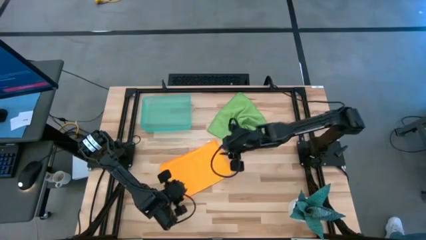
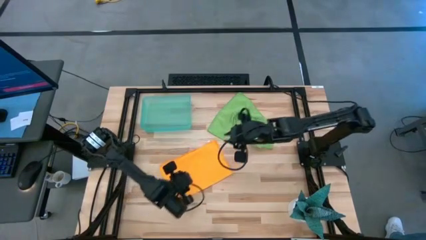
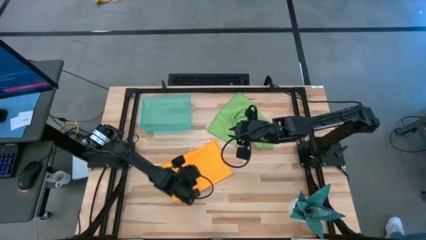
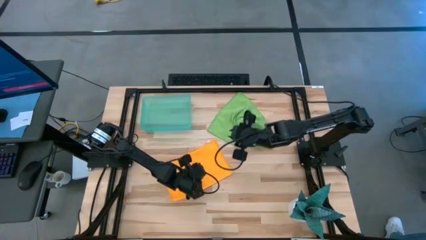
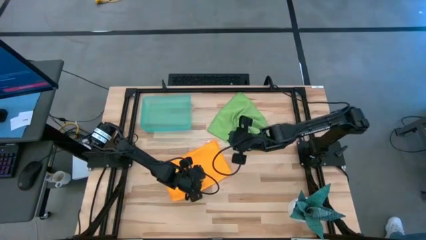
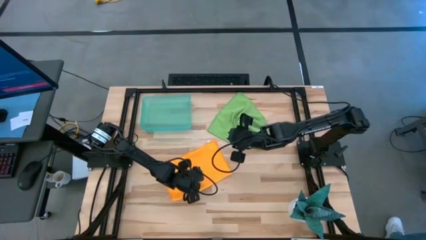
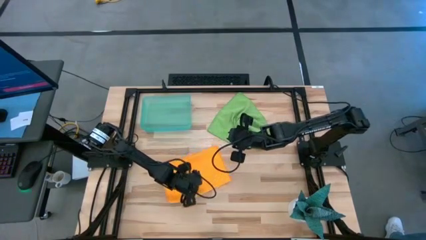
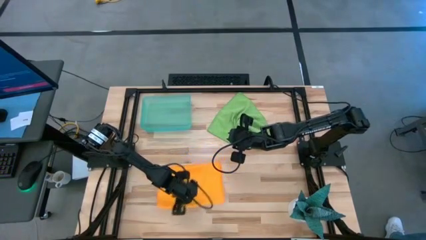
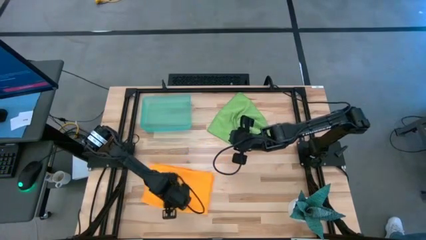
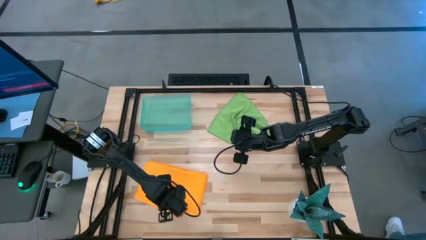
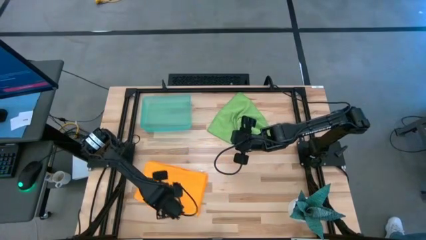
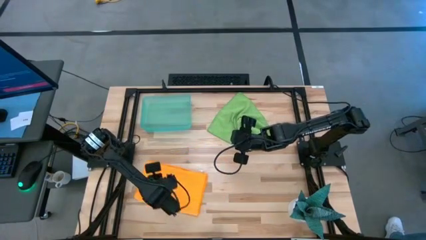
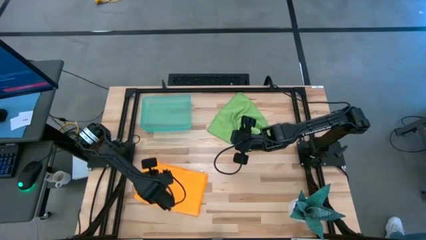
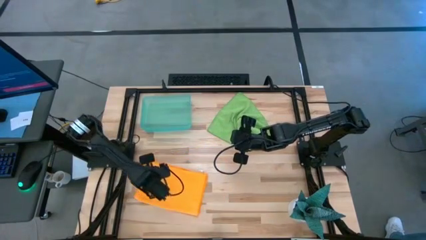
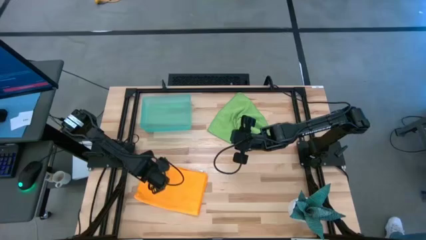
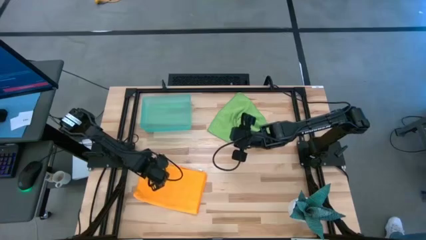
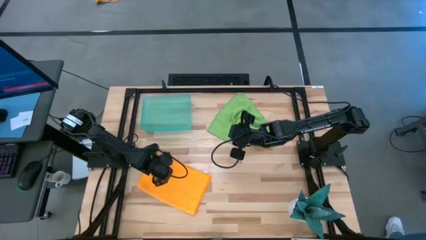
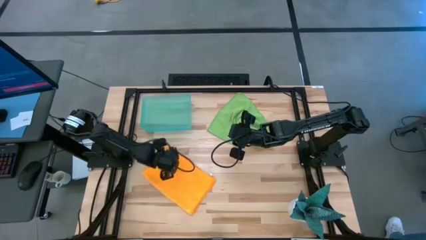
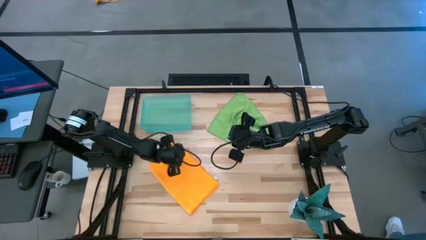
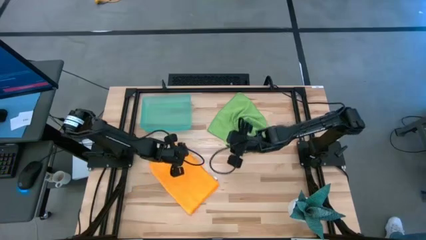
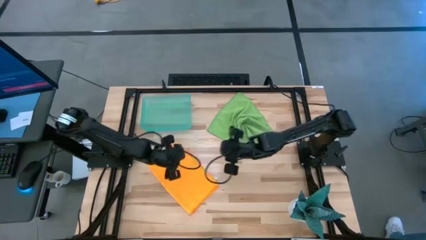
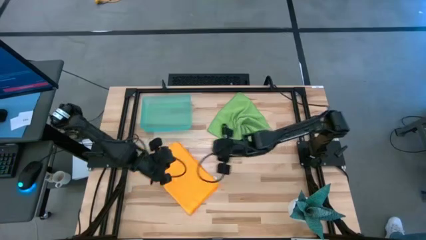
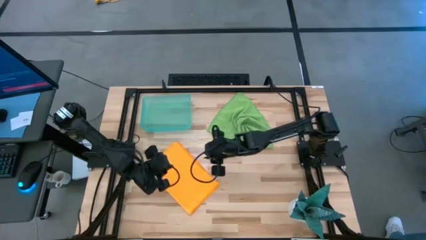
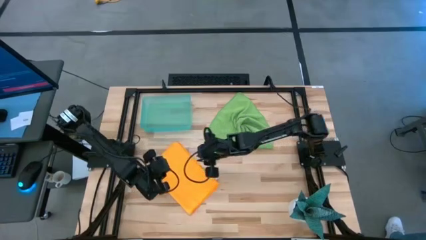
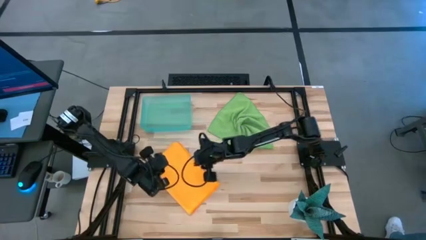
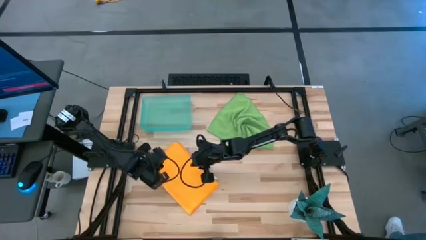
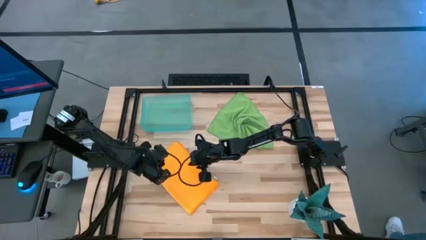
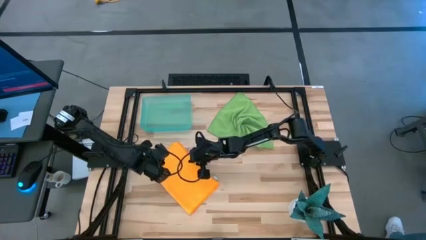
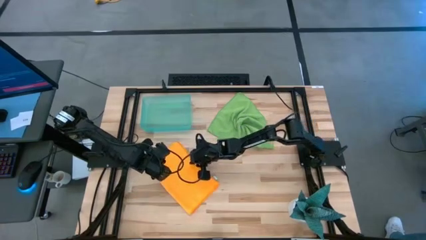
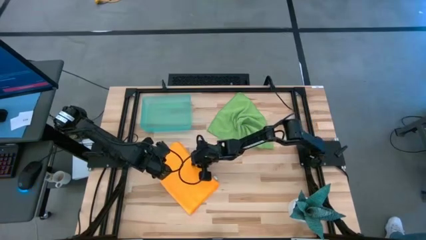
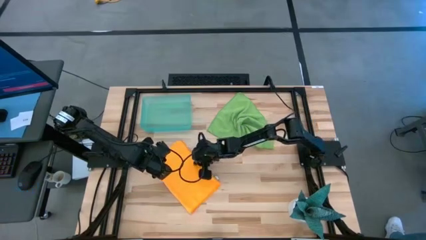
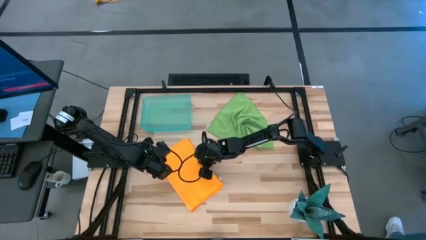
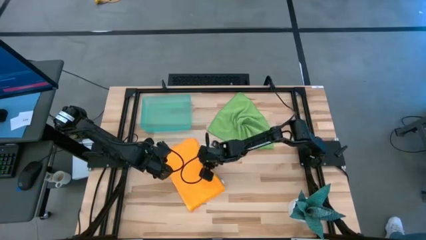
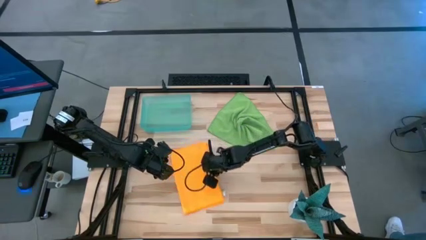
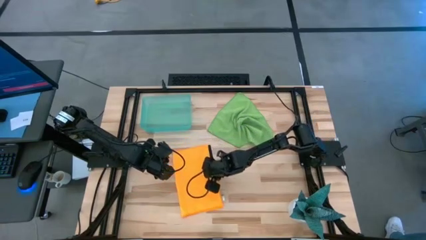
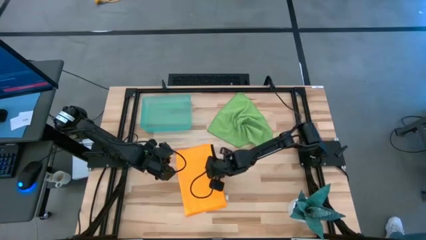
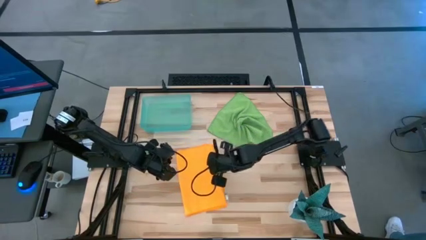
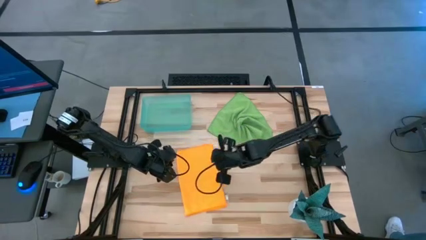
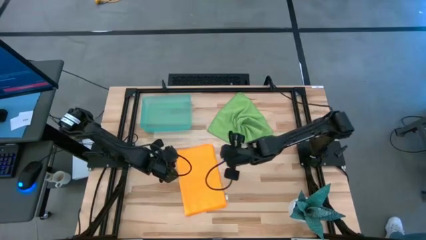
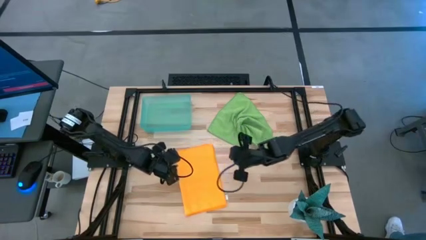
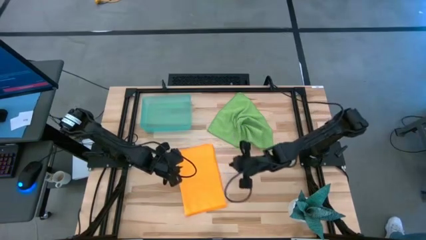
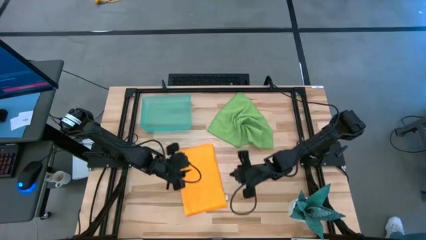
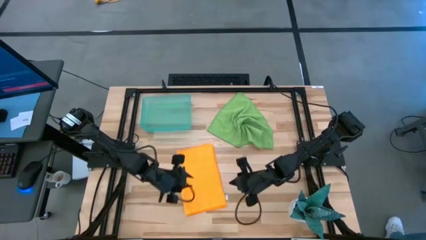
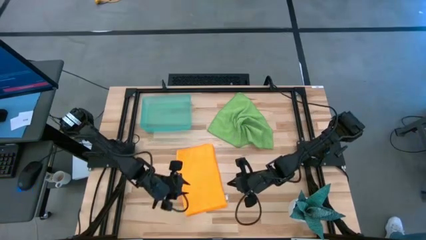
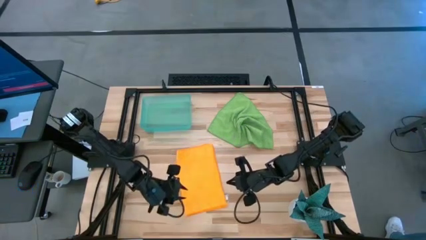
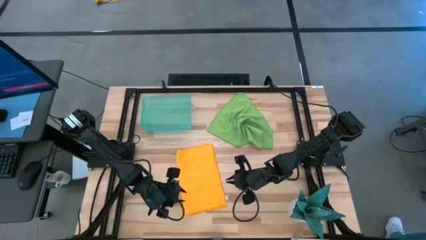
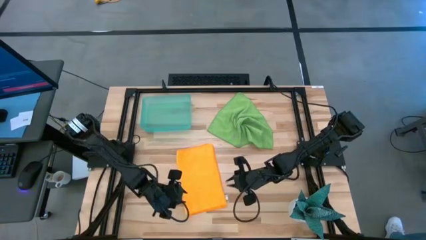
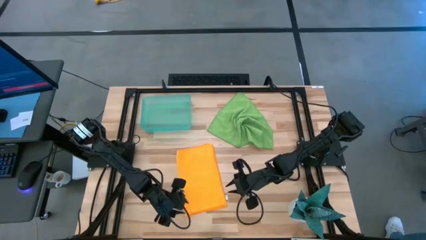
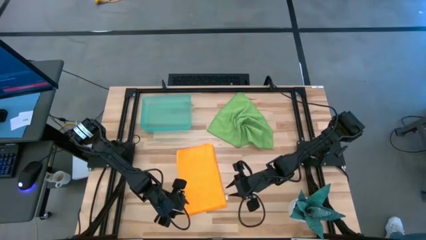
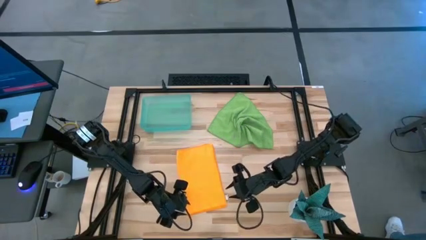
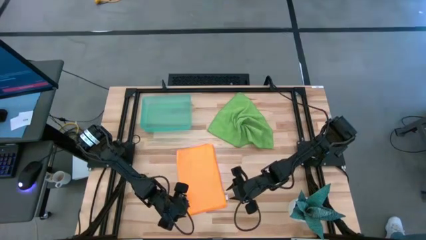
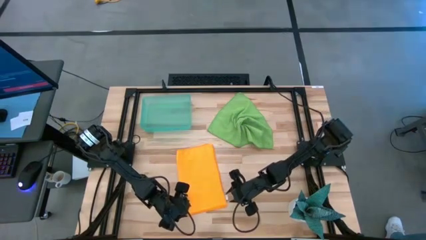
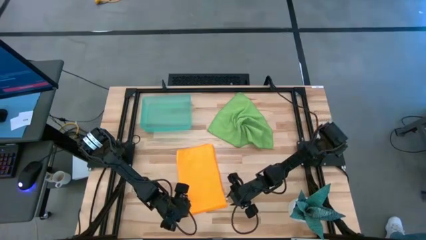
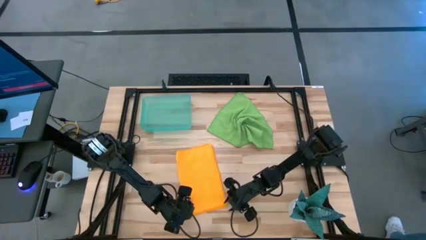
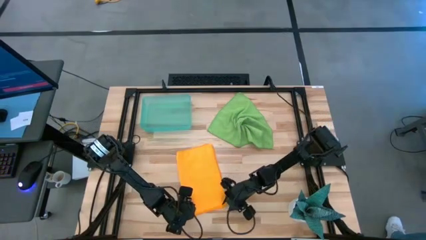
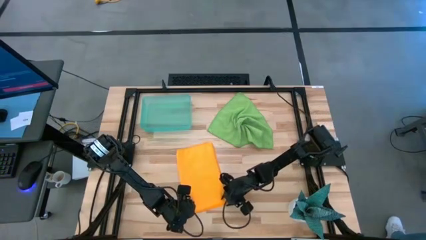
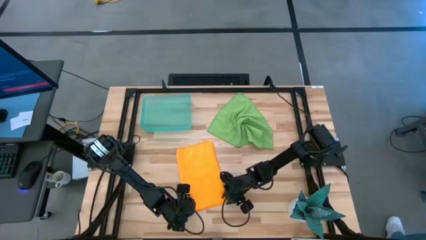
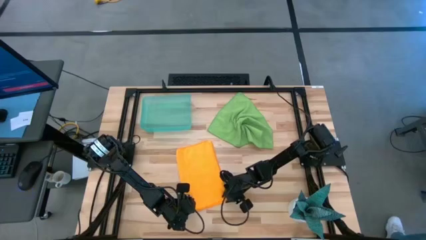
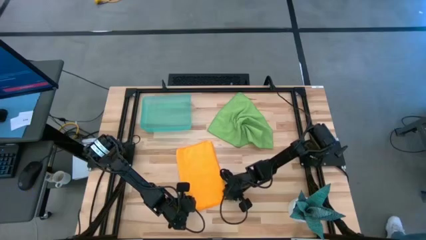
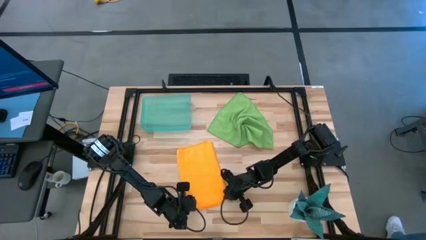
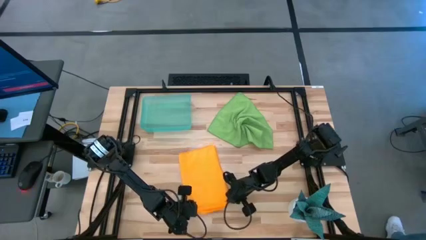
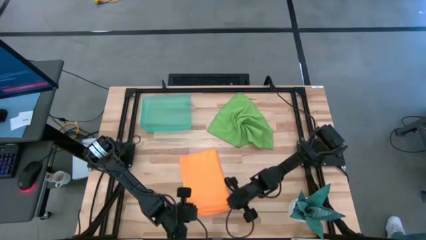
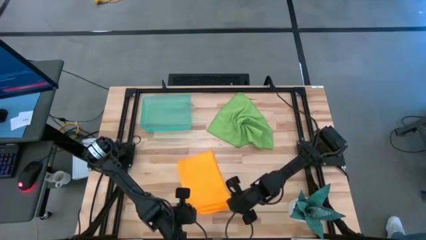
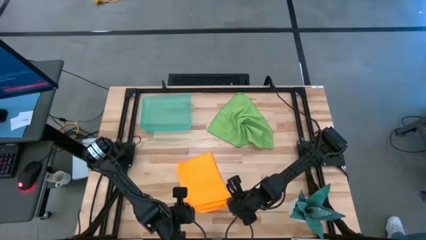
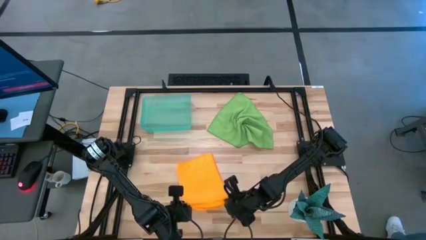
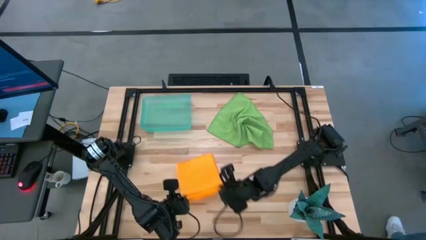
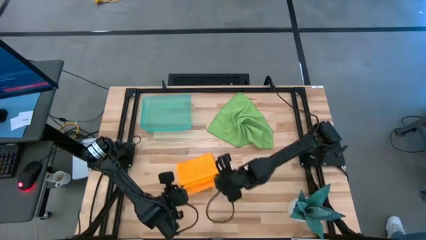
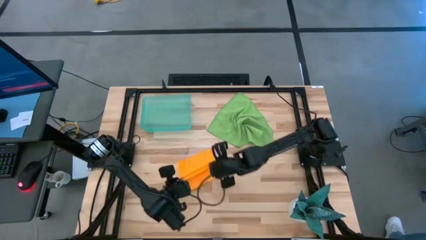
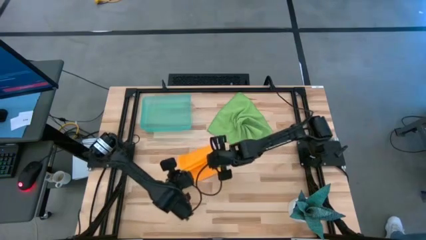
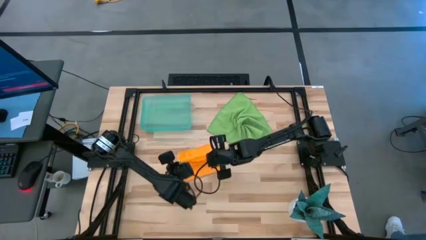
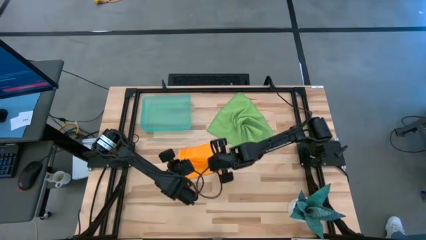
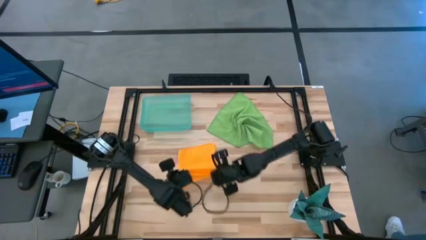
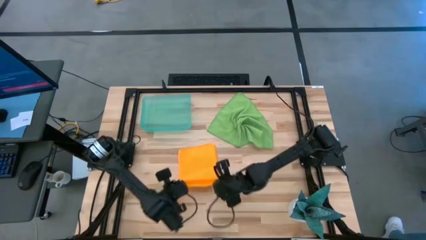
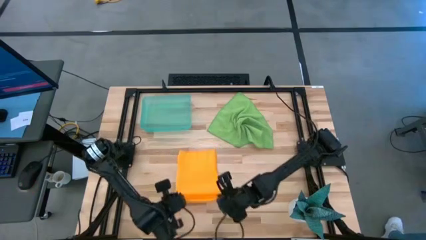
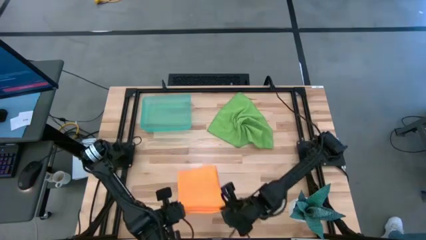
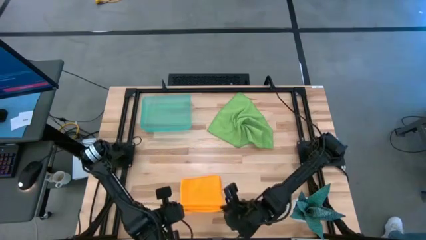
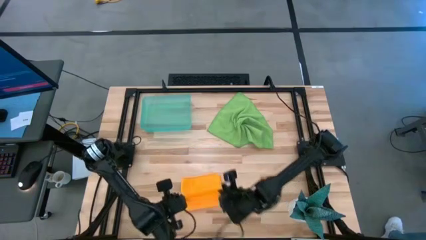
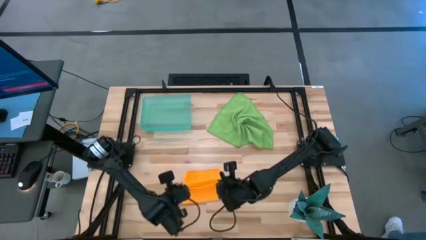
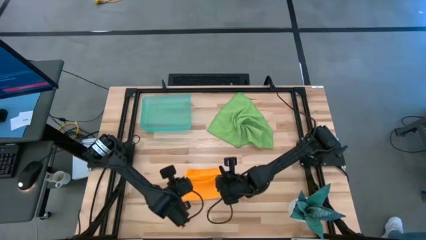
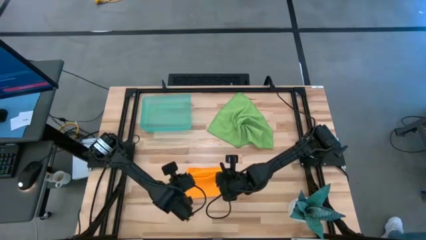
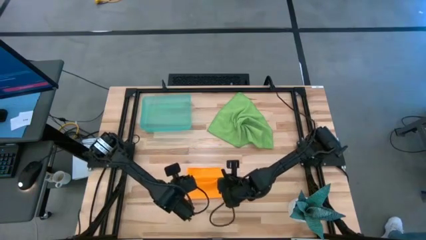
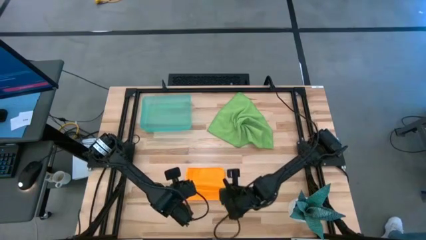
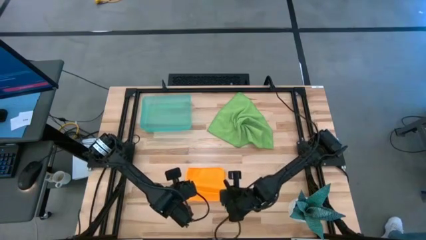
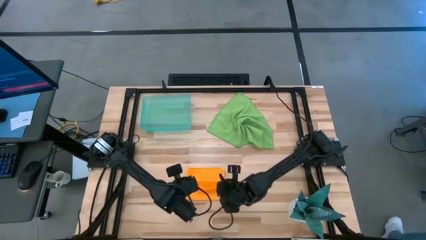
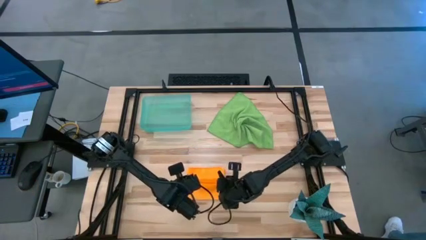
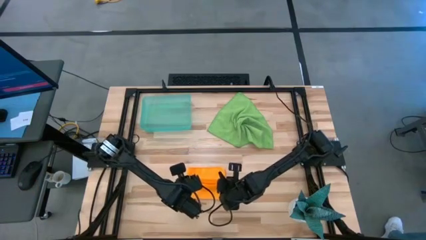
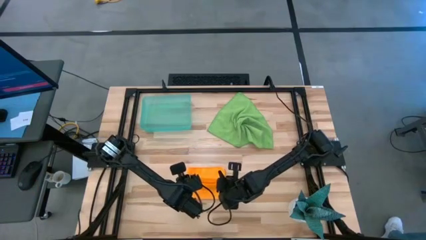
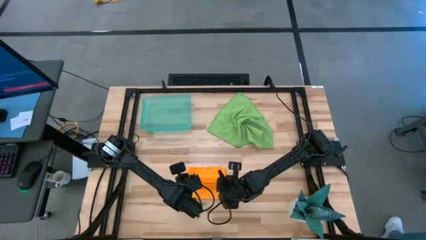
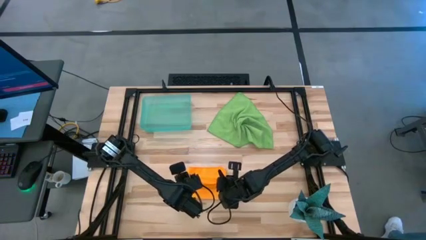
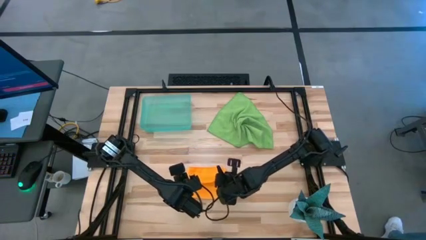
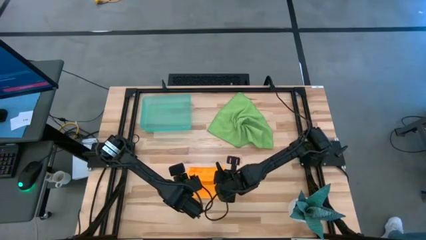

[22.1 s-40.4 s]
Task: Roll microfiber towels into tight, uniform cylinder then place into a basket
Fold the yellow towel
